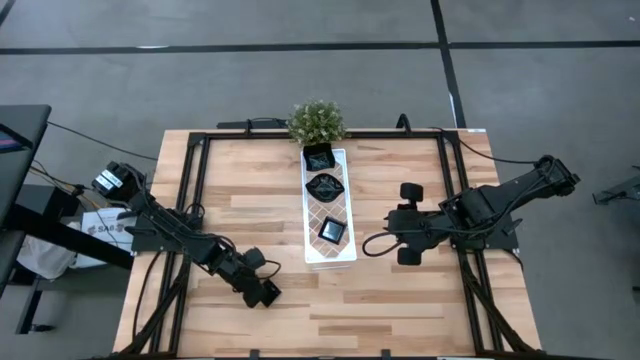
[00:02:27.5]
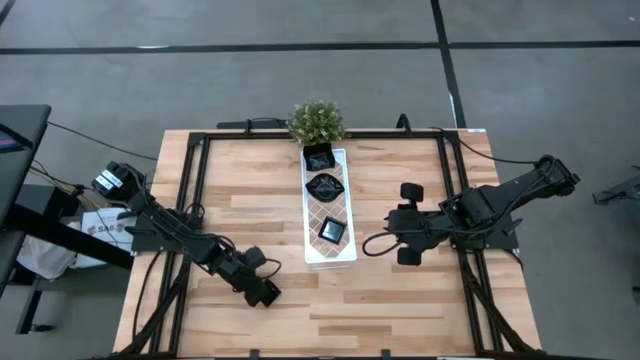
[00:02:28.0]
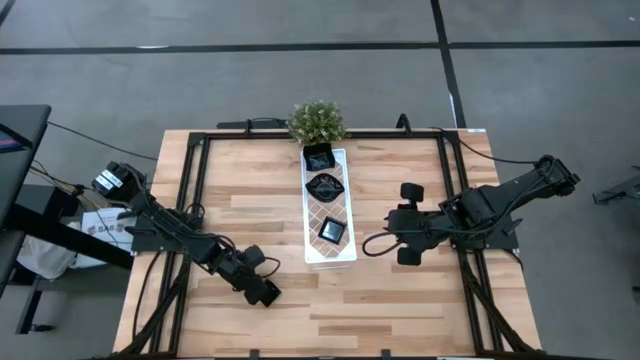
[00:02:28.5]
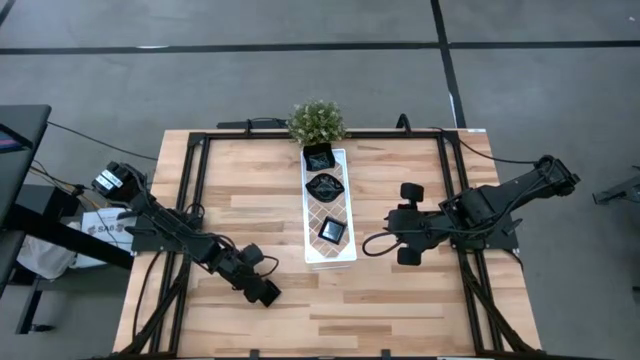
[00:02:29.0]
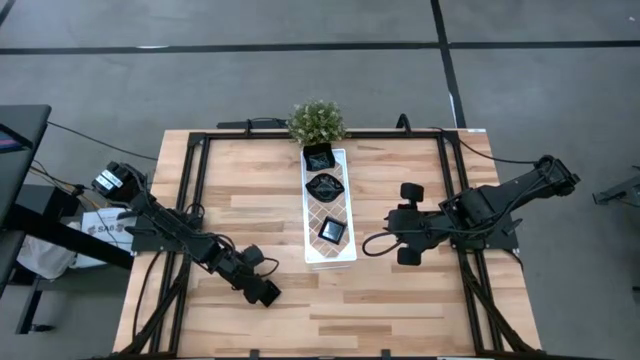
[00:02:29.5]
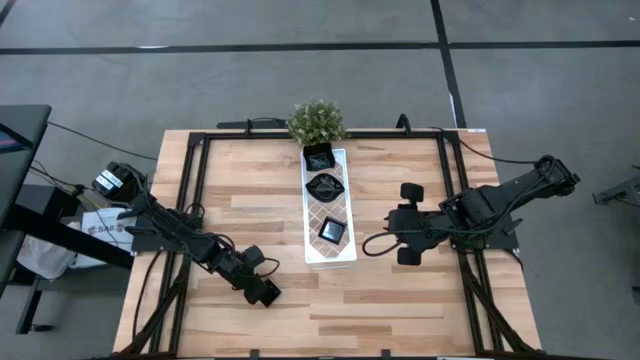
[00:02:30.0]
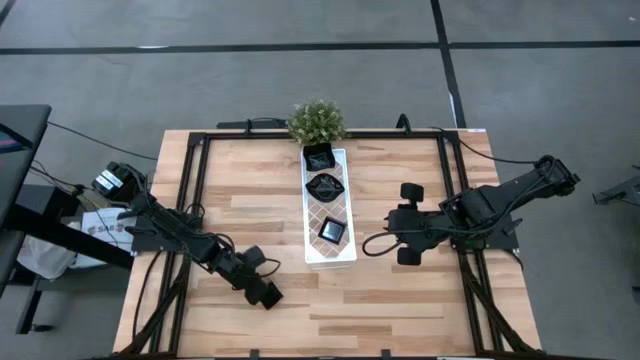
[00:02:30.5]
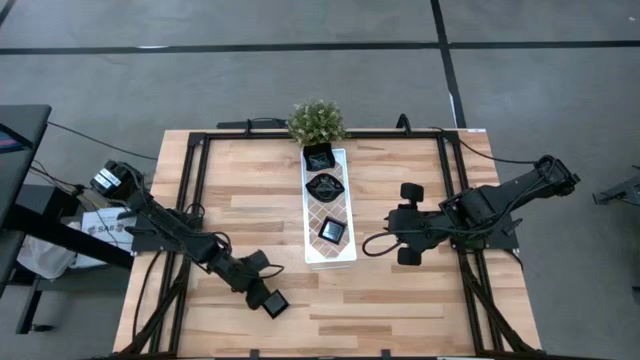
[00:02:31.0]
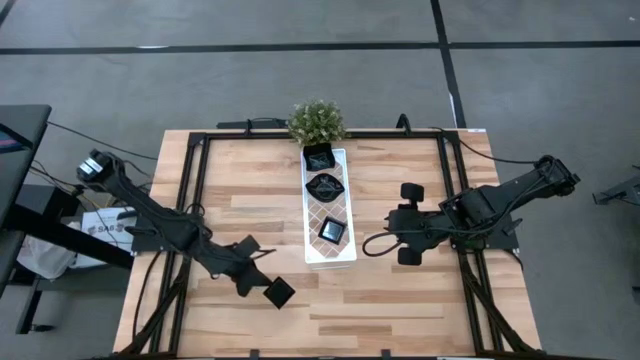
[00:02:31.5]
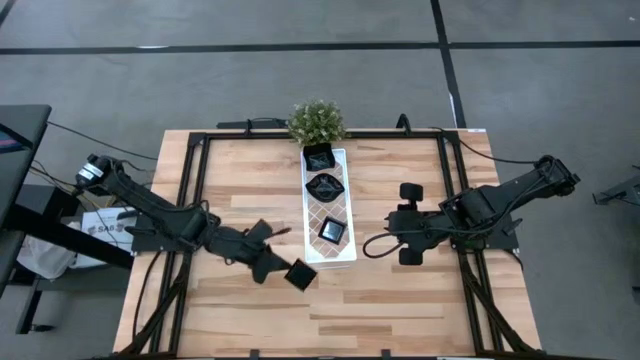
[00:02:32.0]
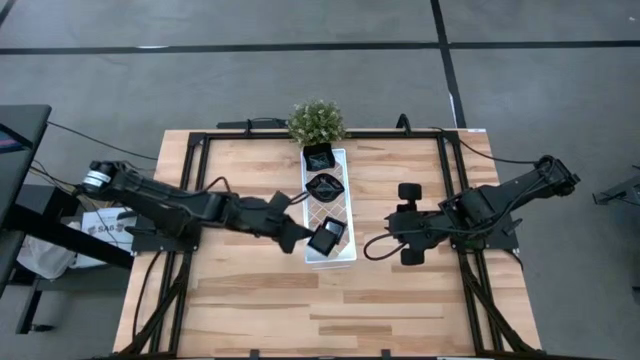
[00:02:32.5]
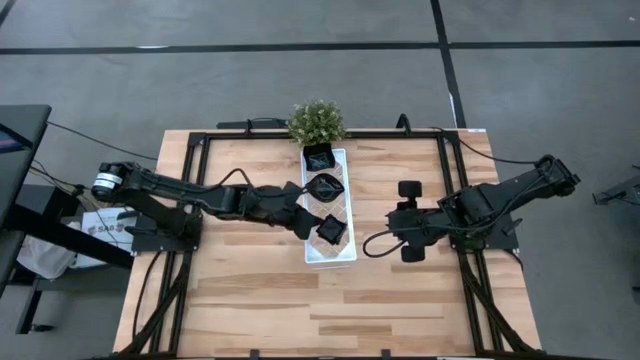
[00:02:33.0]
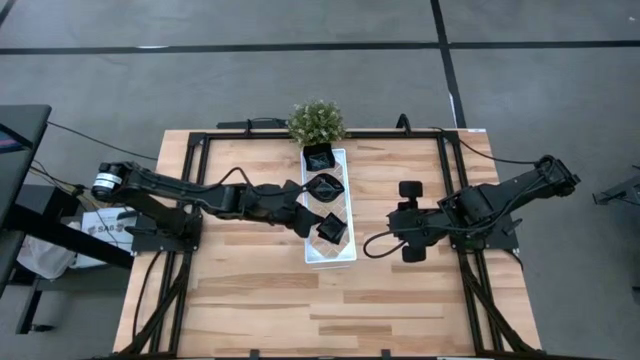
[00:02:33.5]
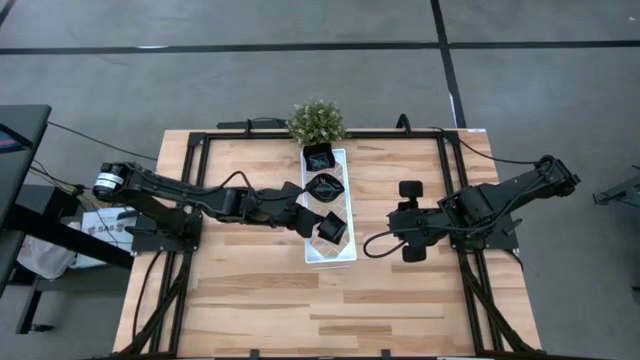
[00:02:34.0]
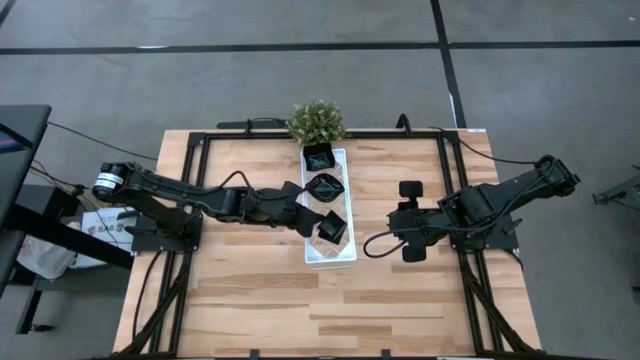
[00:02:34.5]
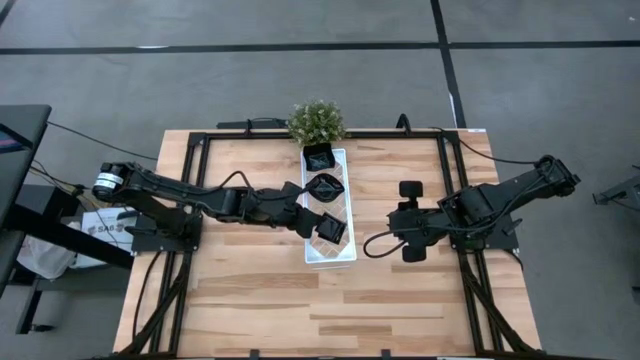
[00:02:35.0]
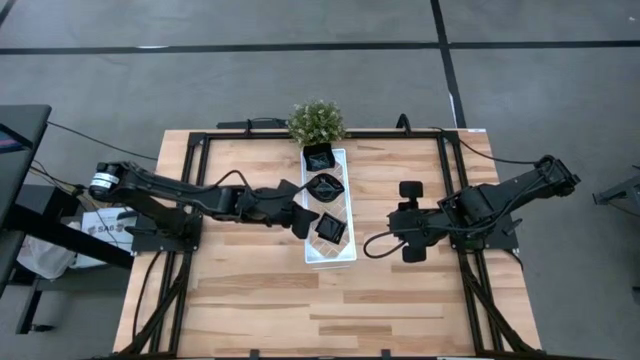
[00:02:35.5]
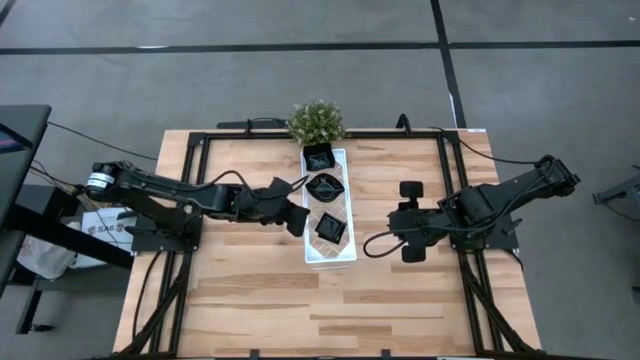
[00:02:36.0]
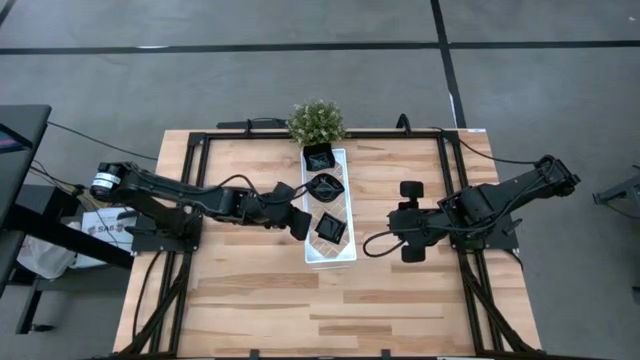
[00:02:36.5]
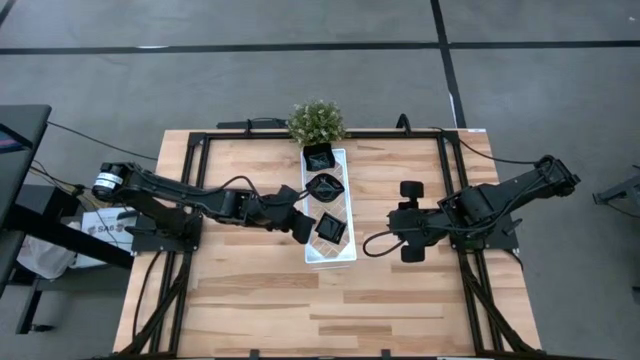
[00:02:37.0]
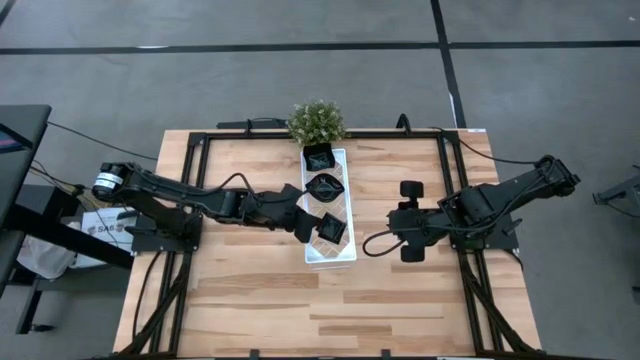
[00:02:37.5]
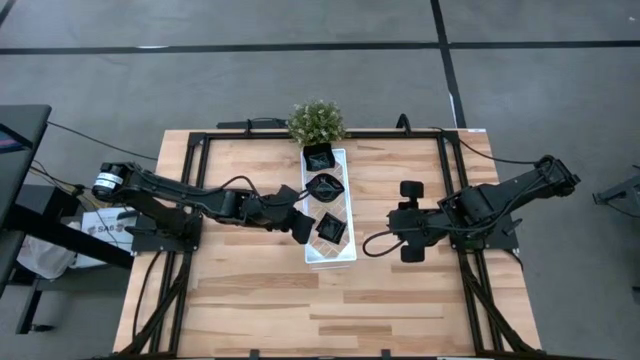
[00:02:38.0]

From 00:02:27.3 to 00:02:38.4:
Task: Pick & Place Mini shaped plates
Stack the square plate on the other square plate on the shelf

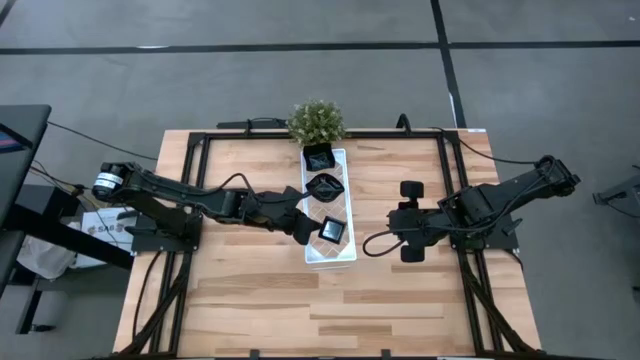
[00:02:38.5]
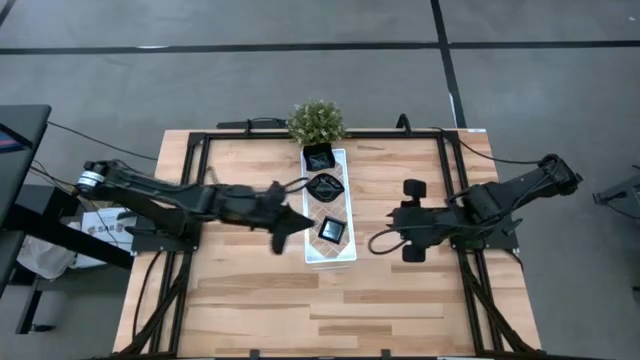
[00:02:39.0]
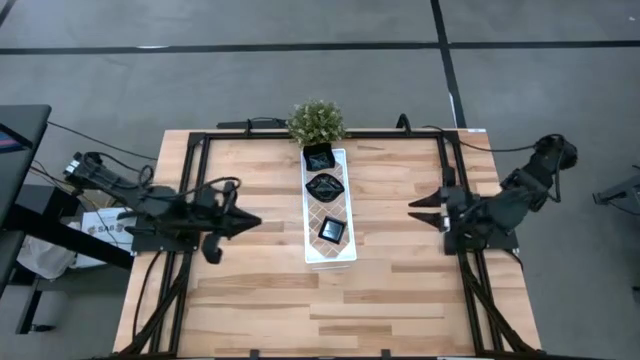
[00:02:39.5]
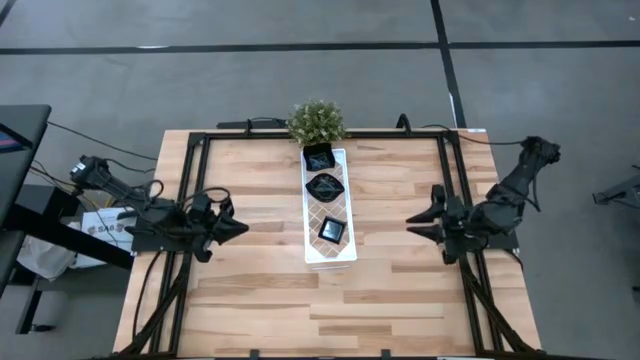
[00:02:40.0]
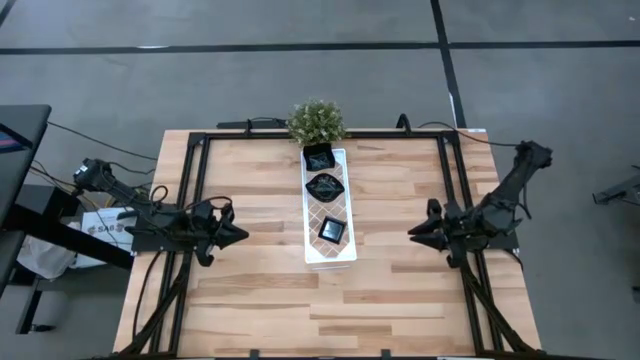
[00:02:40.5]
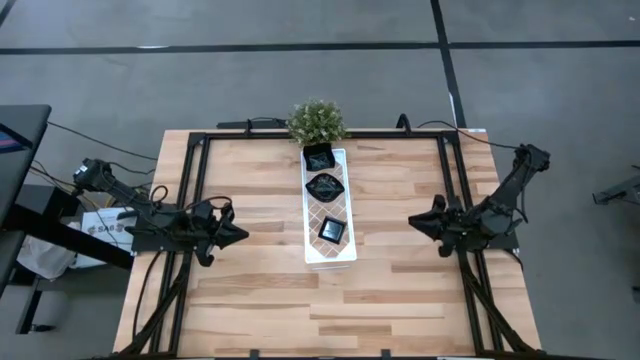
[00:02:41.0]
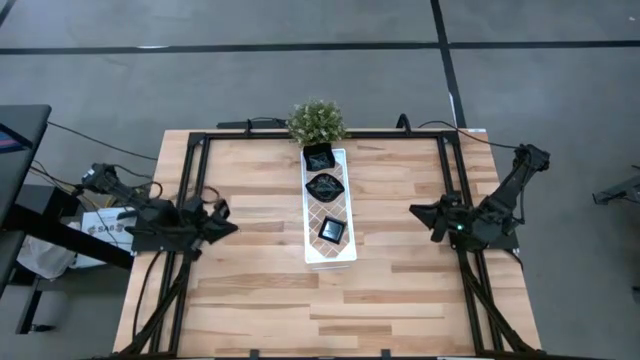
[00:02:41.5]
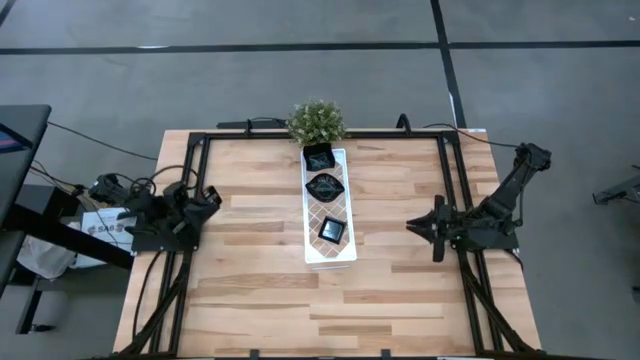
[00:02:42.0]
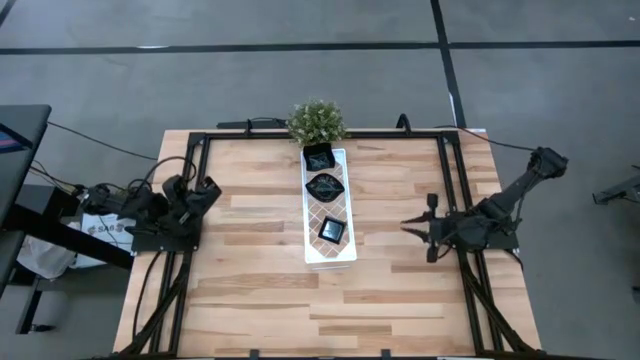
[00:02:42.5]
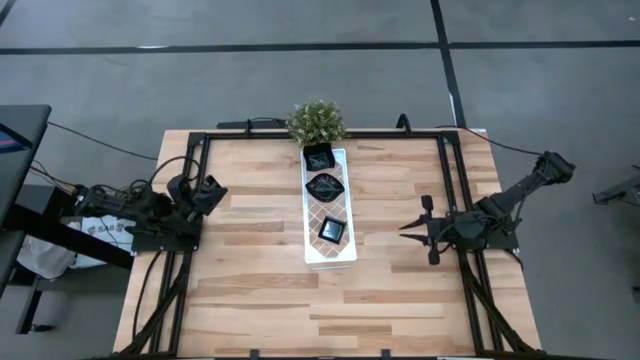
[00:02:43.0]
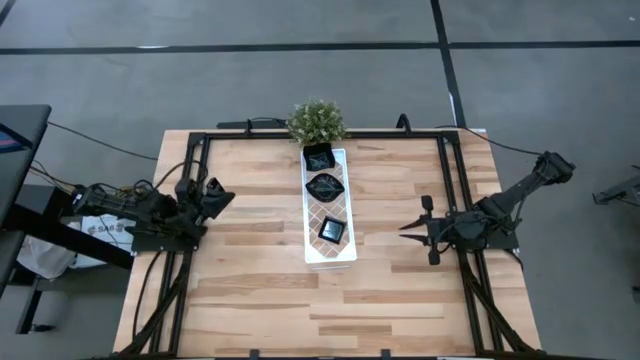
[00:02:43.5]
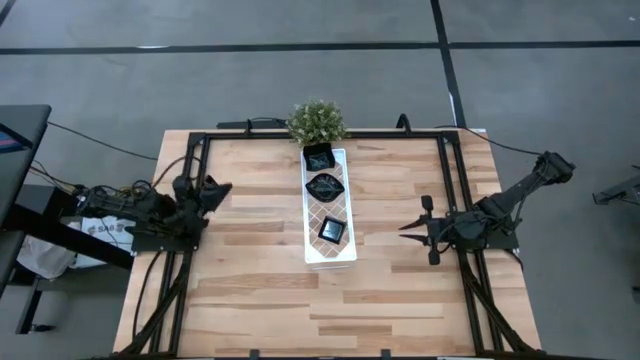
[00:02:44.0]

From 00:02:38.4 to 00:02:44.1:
Return to Home Position

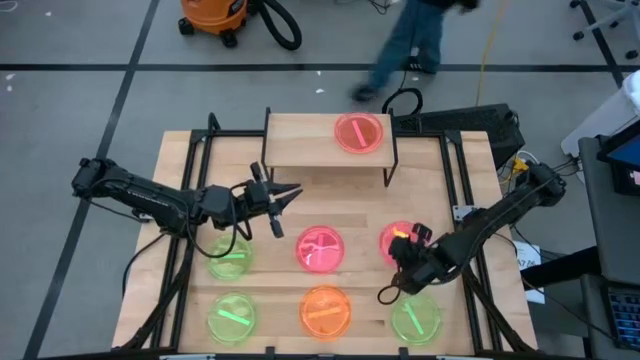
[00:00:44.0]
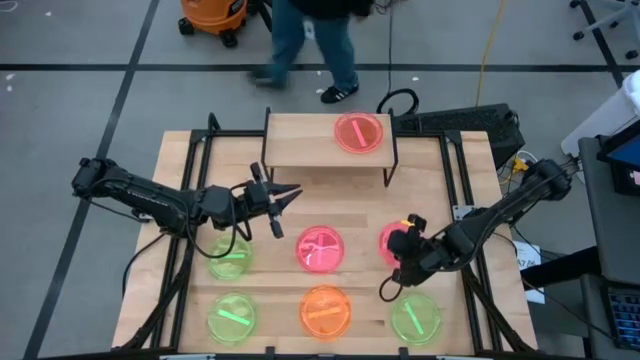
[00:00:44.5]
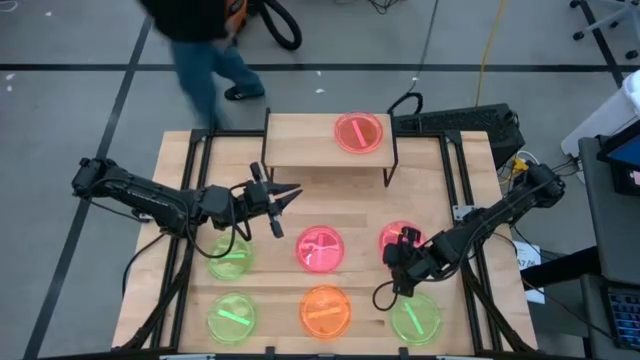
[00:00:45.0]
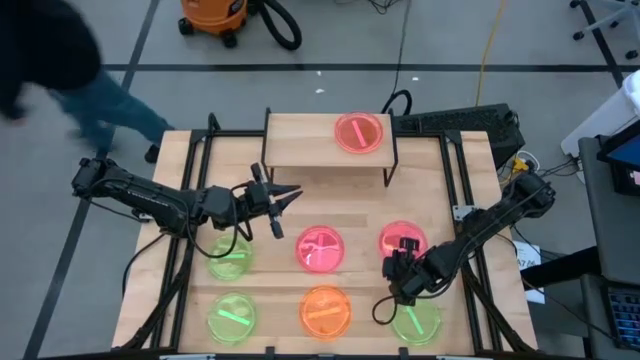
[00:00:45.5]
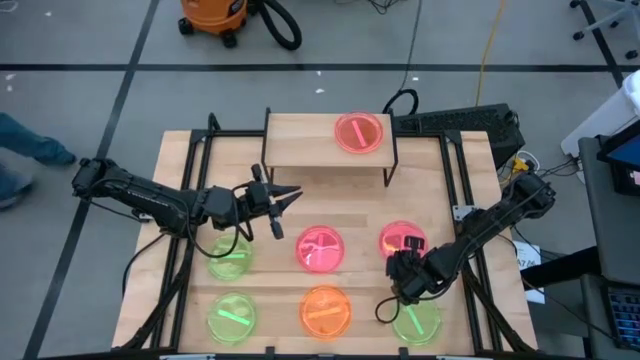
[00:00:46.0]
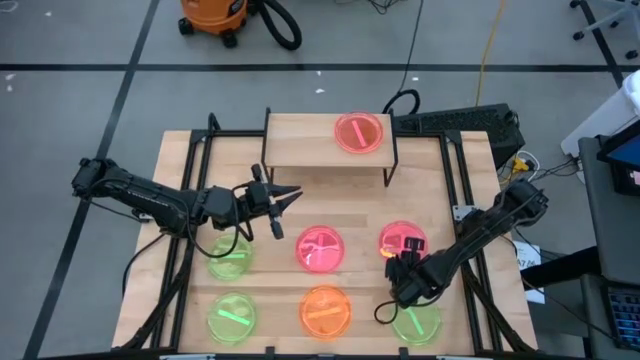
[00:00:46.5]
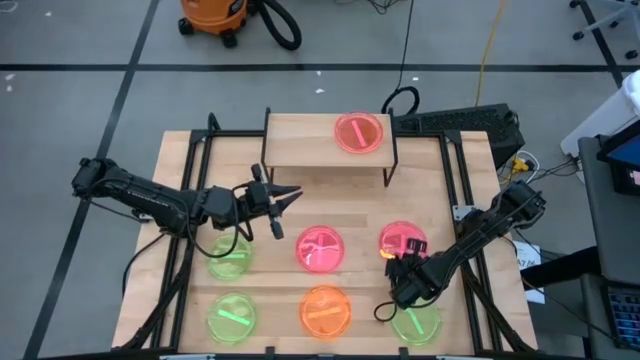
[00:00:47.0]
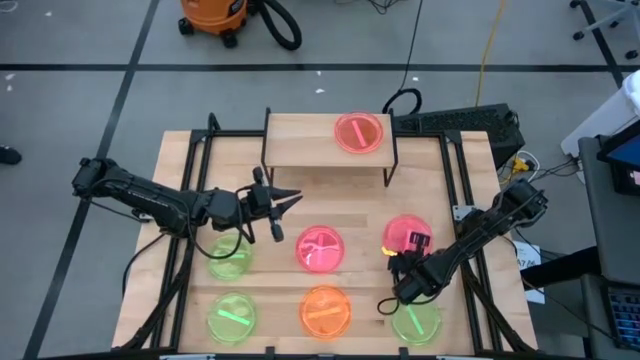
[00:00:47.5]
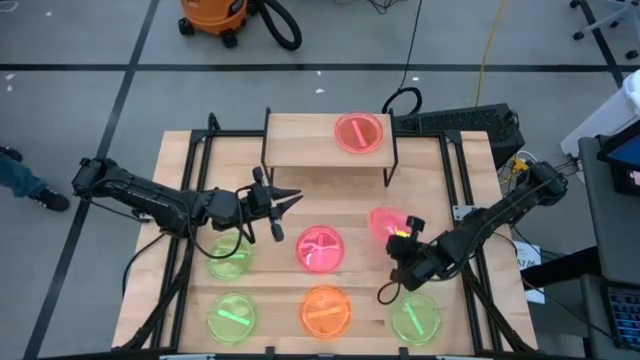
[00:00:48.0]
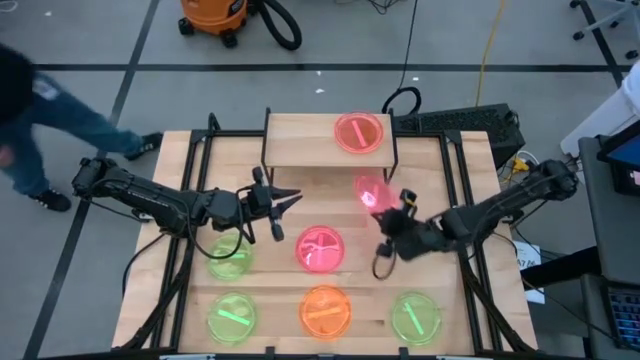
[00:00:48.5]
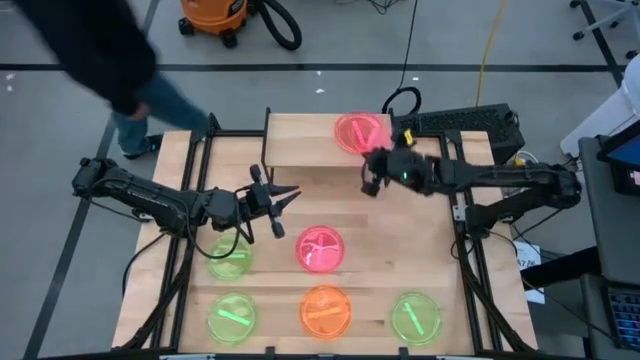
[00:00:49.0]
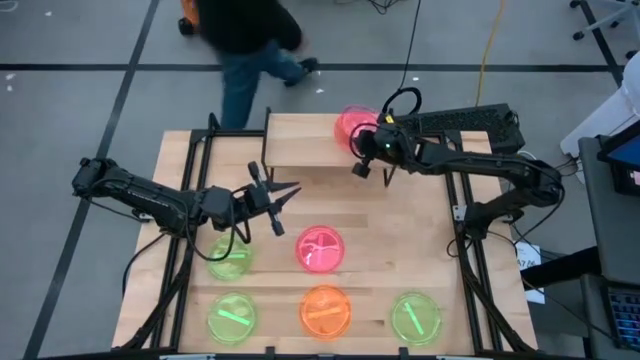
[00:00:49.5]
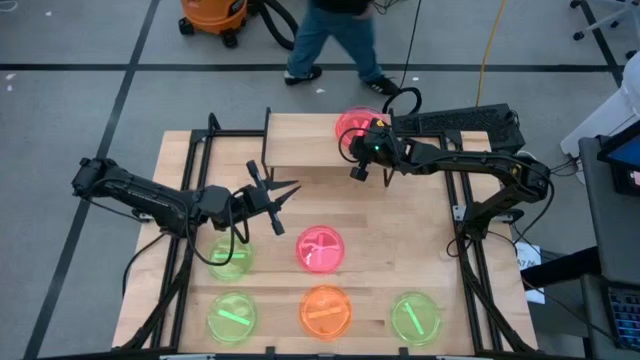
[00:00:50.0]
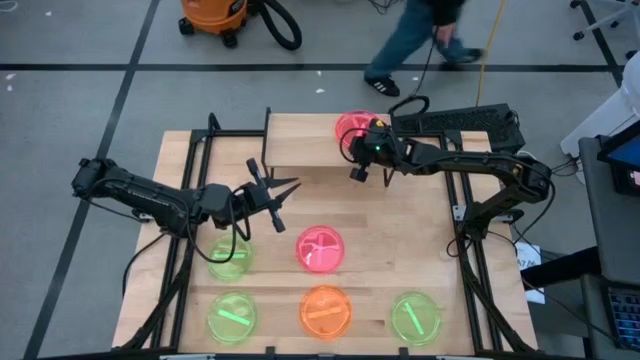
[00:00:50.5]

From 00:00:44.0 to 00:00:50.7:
Task: Place and stack plates onto a shelf
Stack the pink plate on top of the pink plate on the shelf
